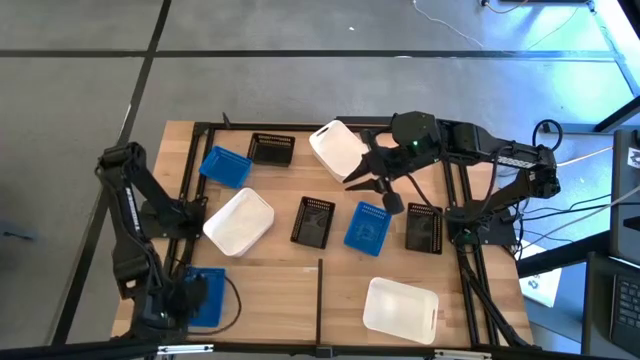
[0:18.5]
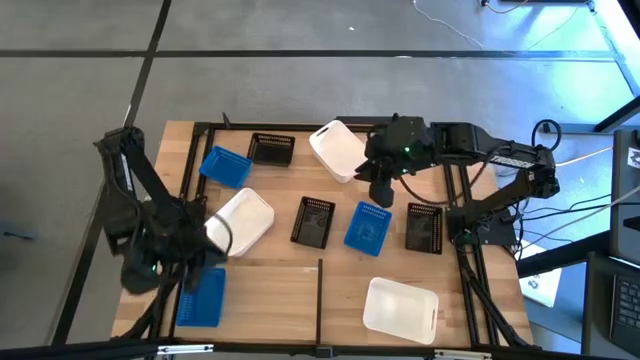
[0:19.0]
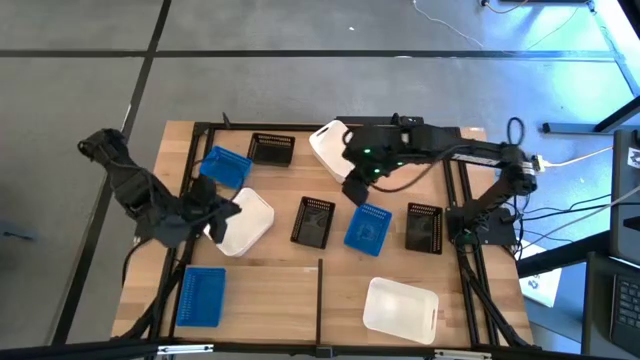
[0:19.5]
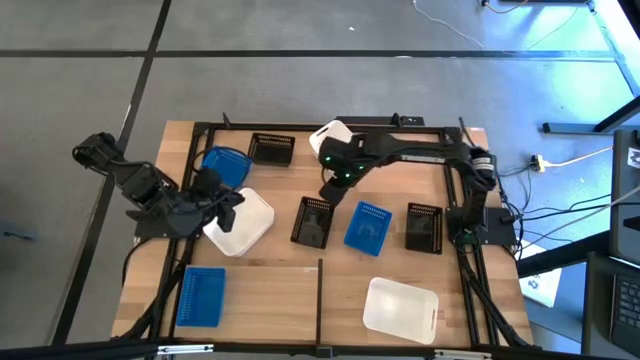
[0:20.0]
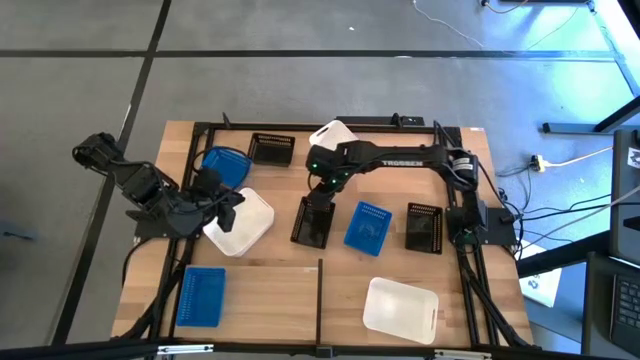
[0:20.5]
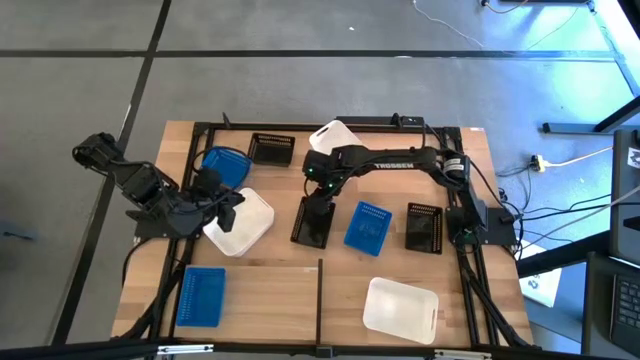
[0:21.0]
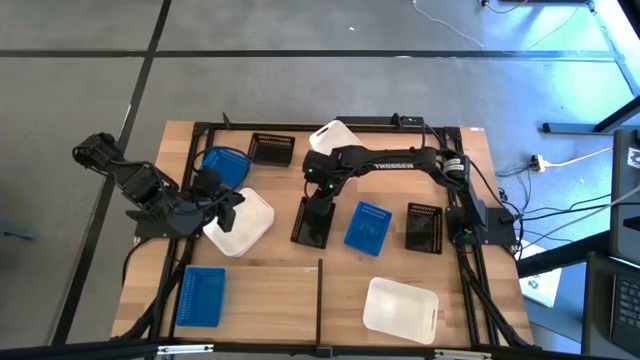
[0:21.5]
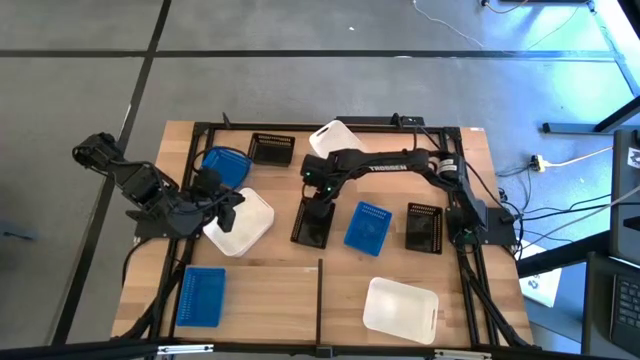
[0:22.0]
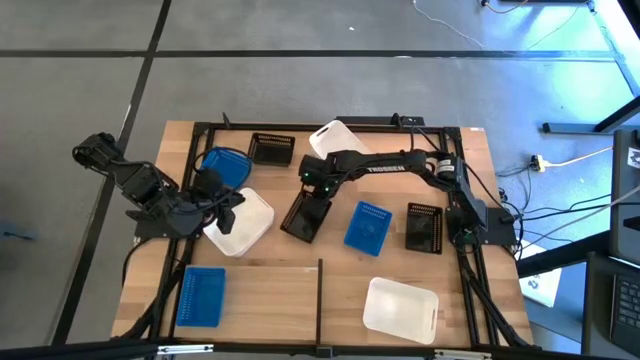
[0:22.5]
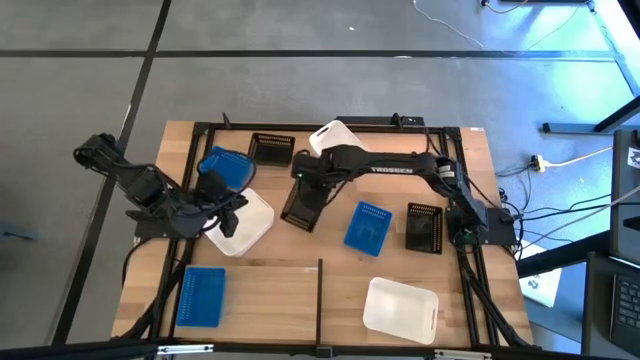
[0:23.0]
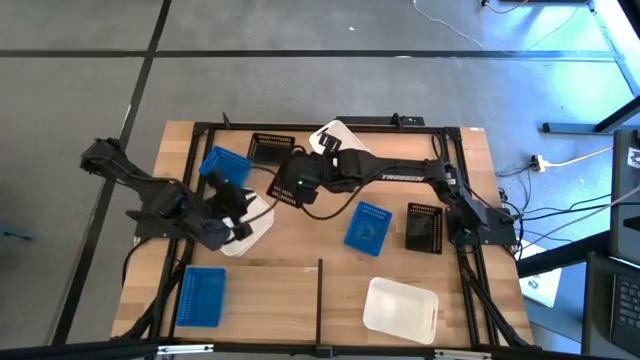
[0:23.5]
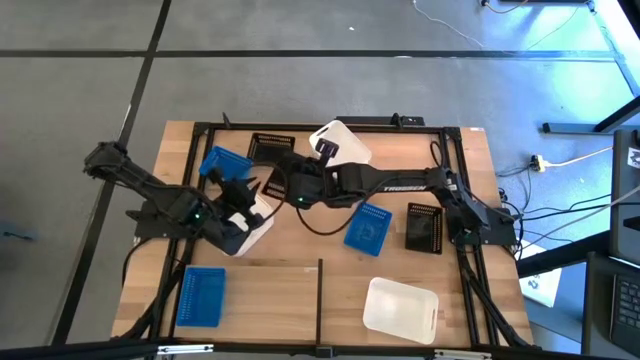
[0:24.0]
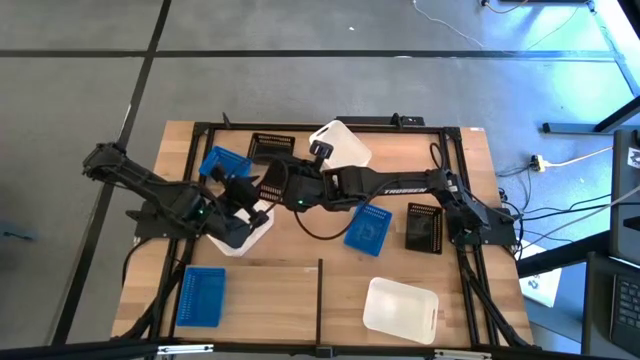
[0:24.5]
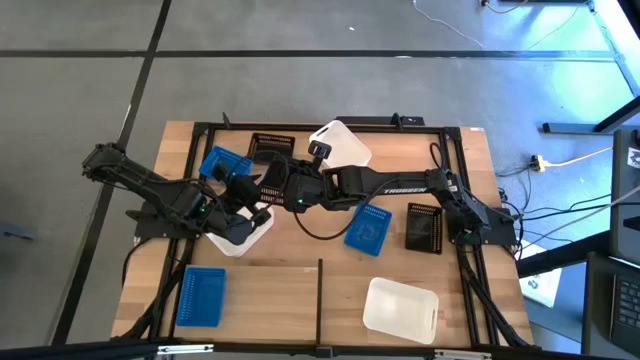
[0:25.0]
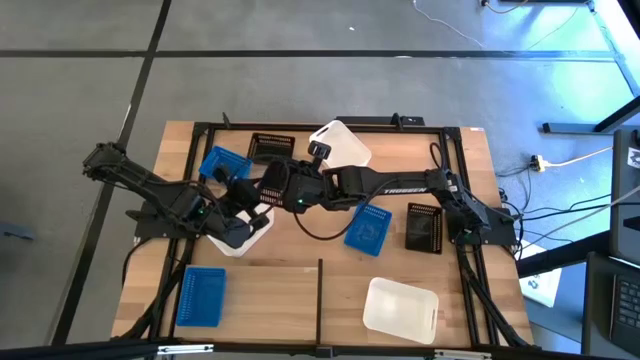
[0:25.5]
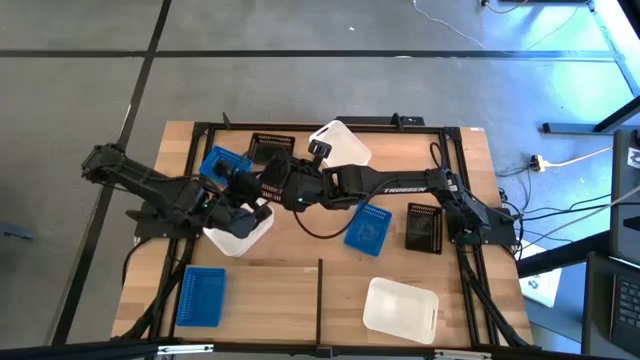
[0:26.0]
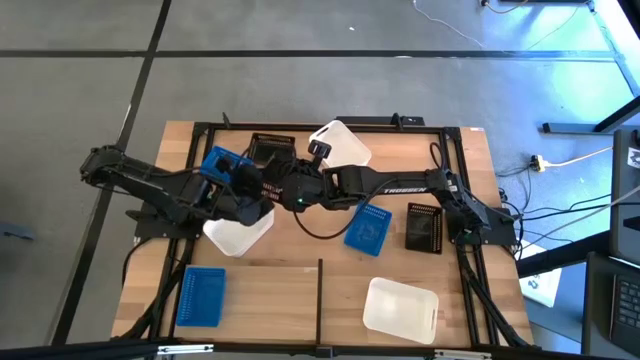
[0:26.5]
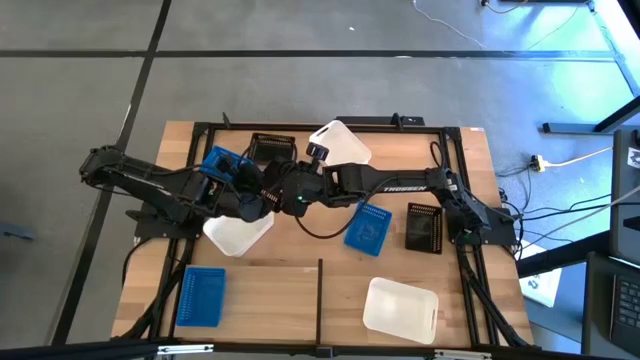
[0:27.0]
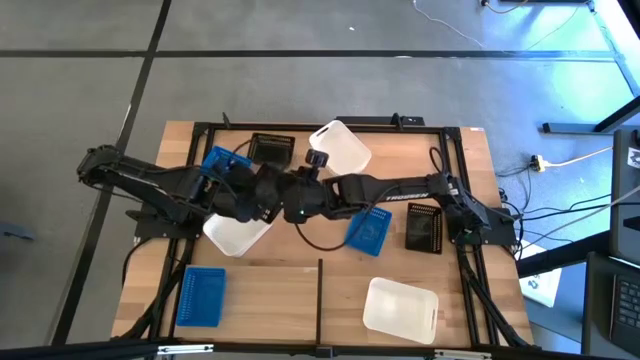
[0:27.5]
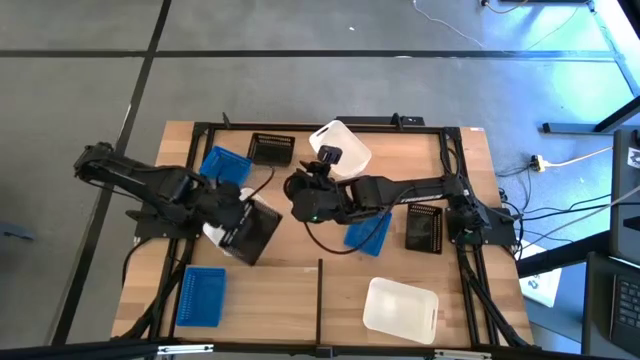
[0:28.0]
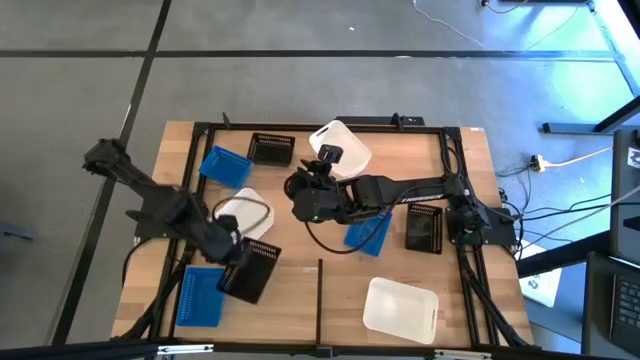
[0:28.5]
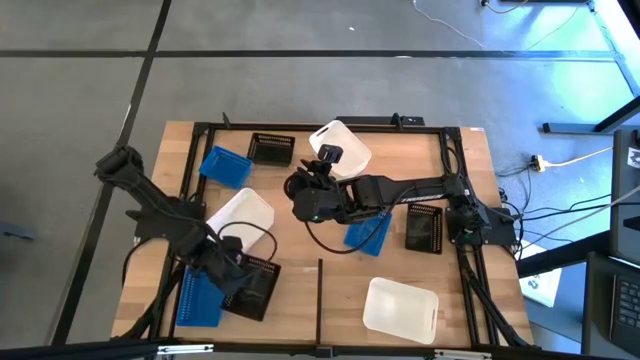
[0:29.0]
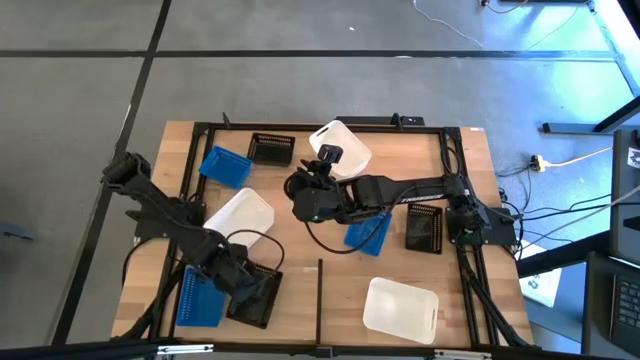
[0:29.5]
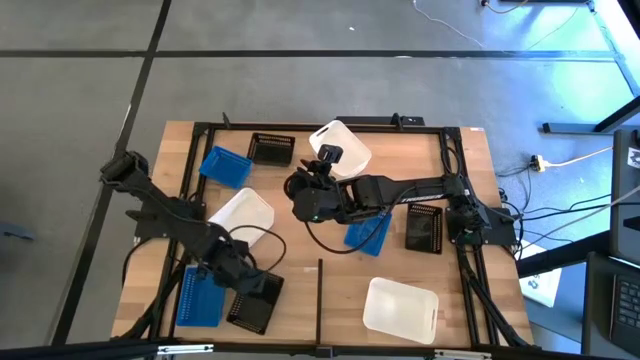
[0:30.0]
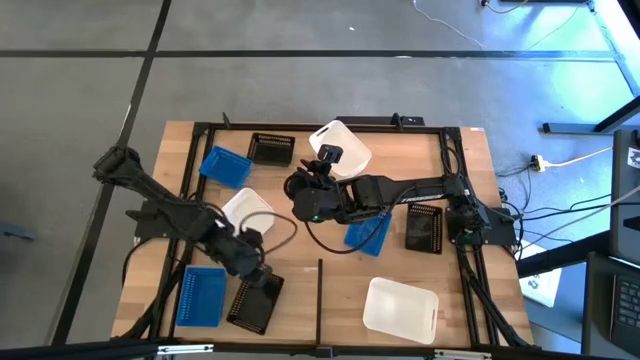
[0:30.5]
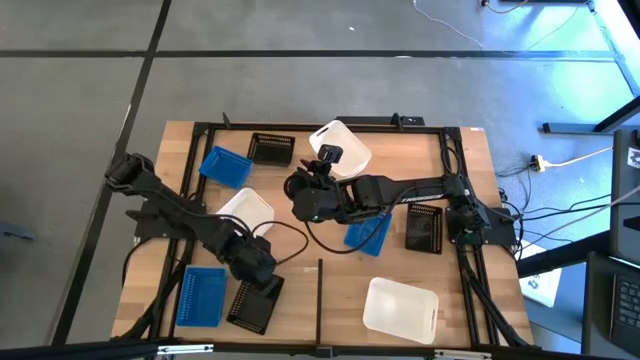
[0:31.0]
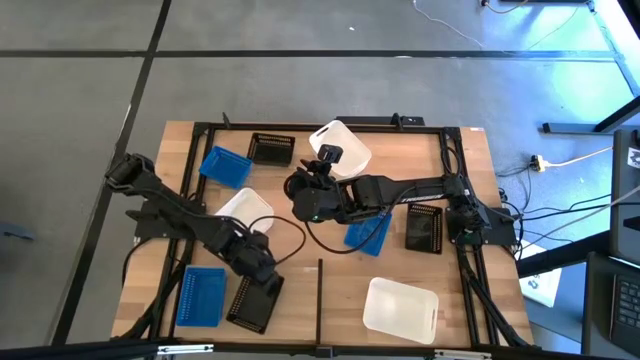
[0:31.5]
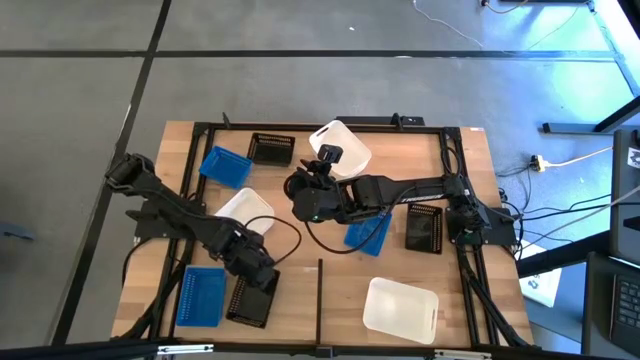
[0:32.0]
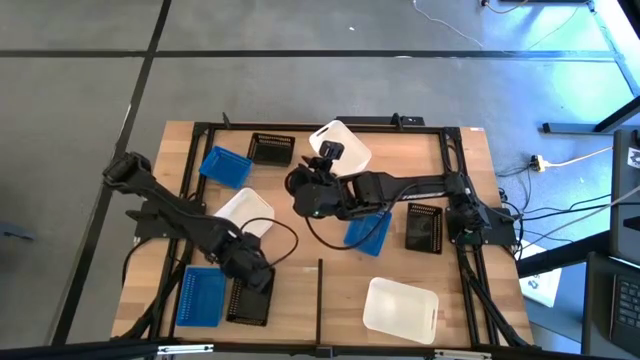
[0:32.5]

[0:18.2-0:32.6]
Task: Stack baskets on shelf by color
Put the bottom left bin on the shelf
